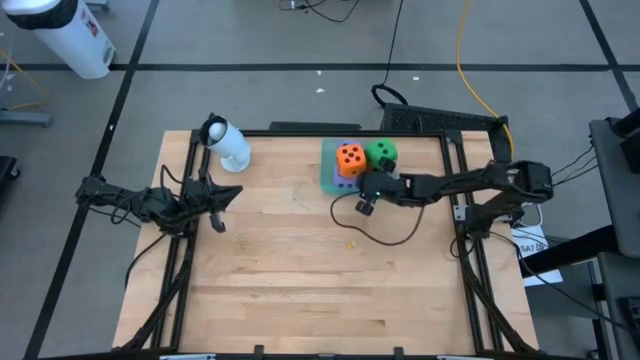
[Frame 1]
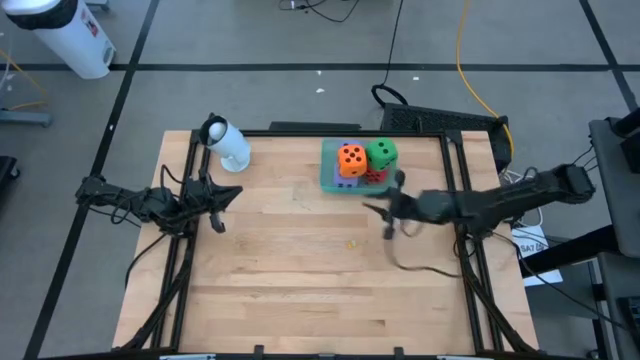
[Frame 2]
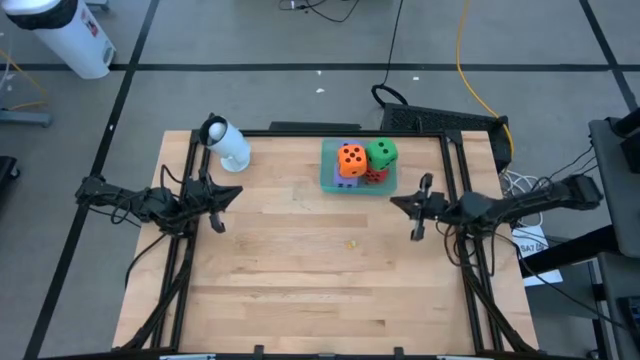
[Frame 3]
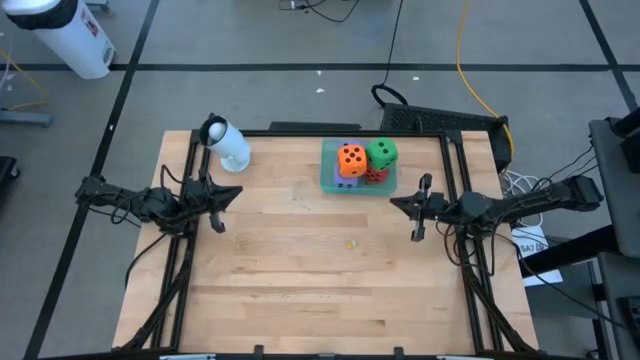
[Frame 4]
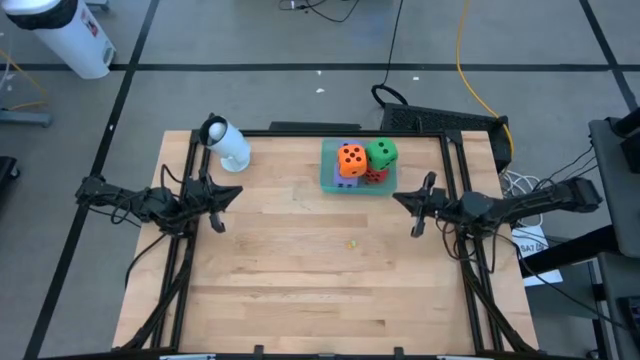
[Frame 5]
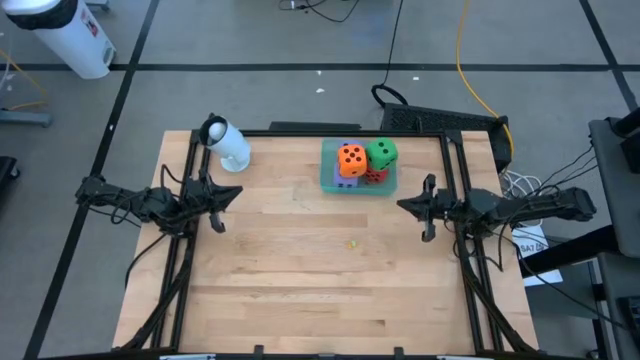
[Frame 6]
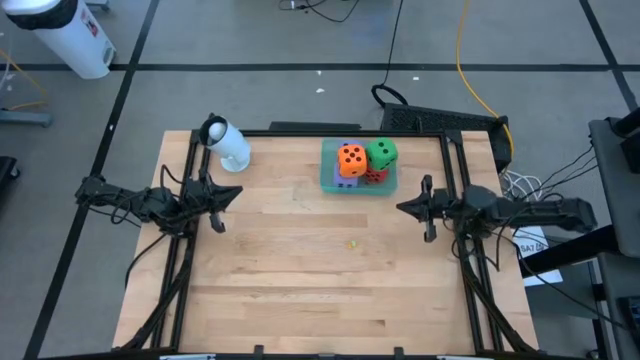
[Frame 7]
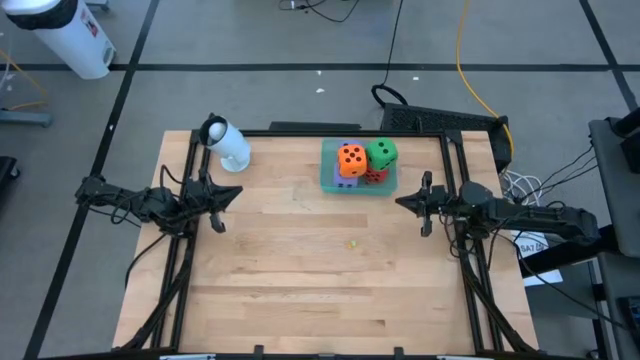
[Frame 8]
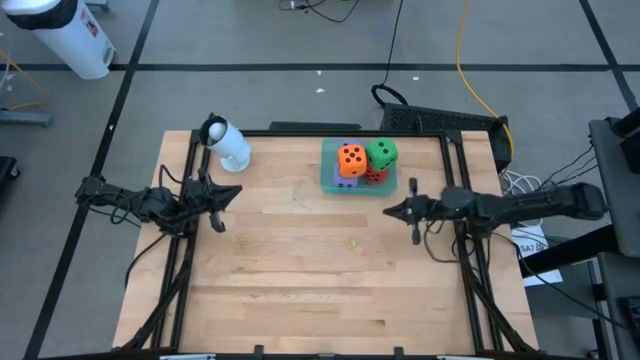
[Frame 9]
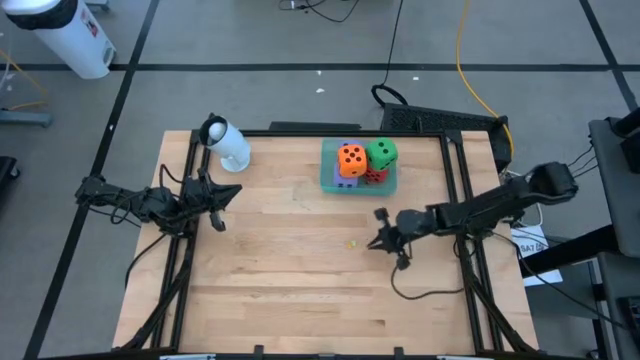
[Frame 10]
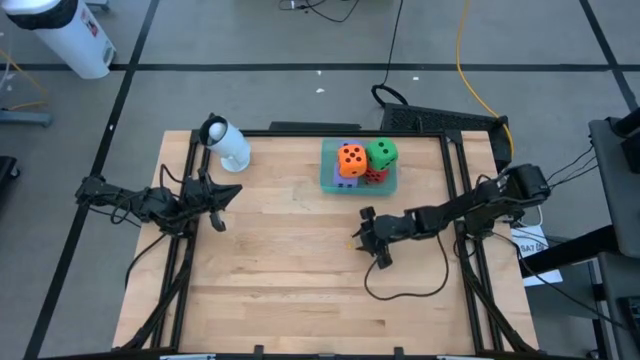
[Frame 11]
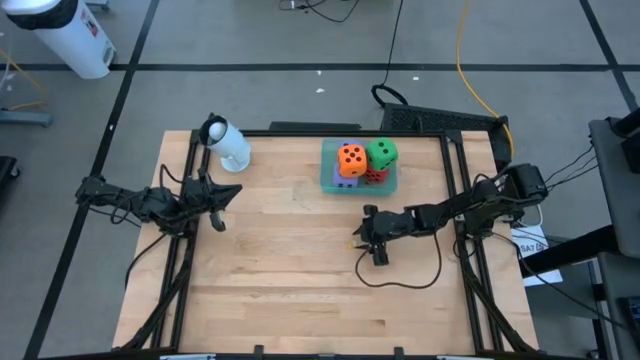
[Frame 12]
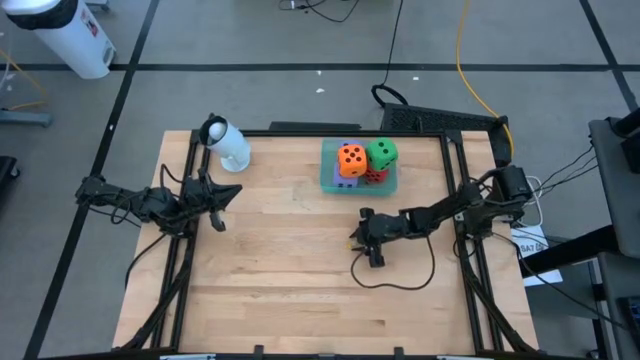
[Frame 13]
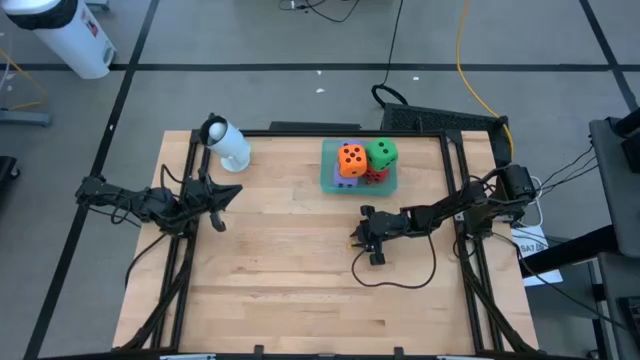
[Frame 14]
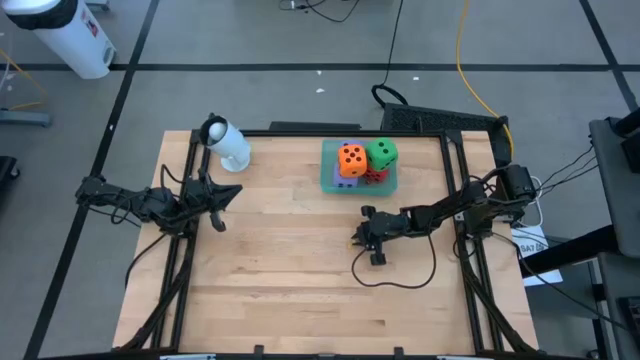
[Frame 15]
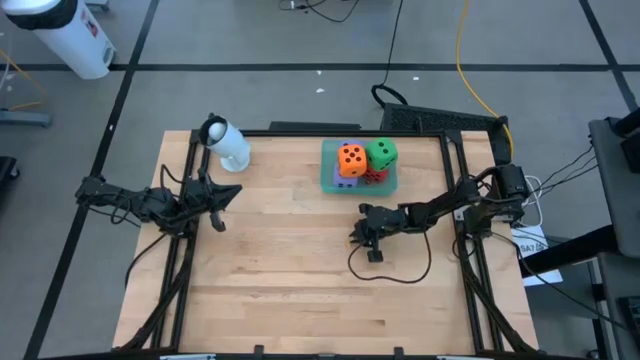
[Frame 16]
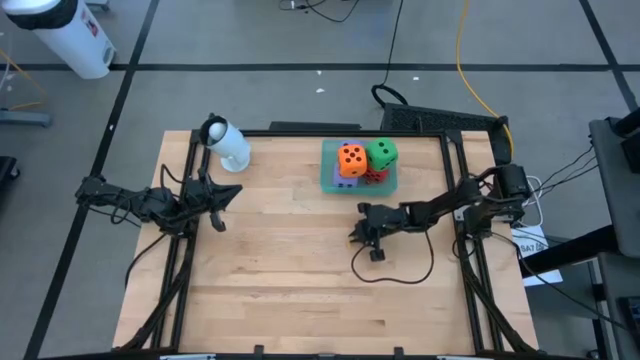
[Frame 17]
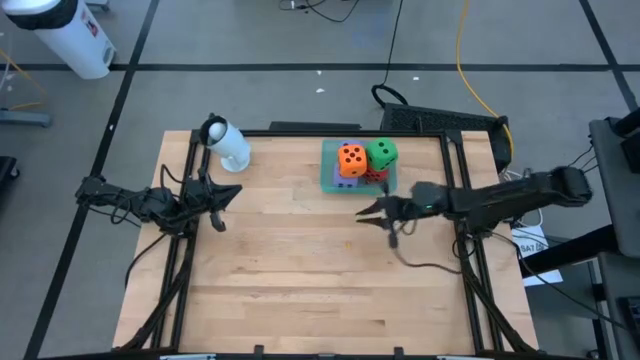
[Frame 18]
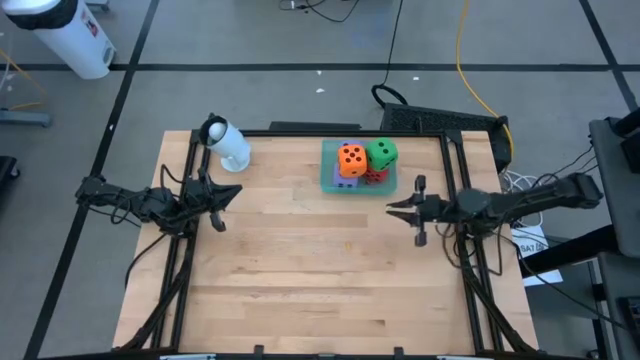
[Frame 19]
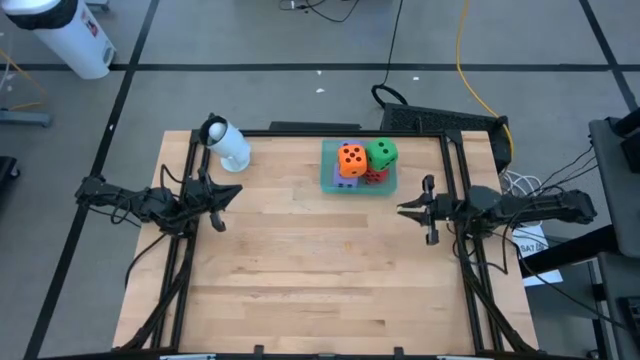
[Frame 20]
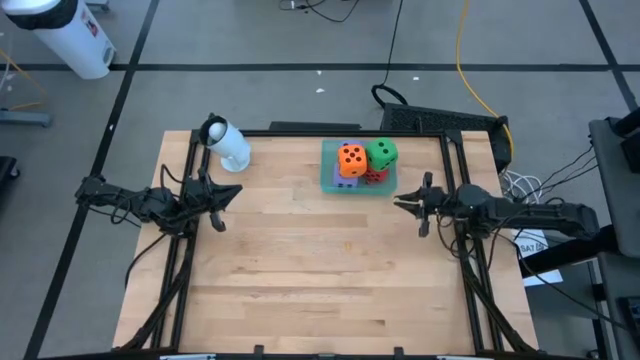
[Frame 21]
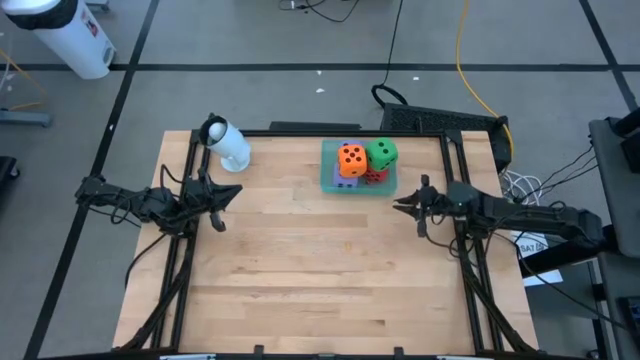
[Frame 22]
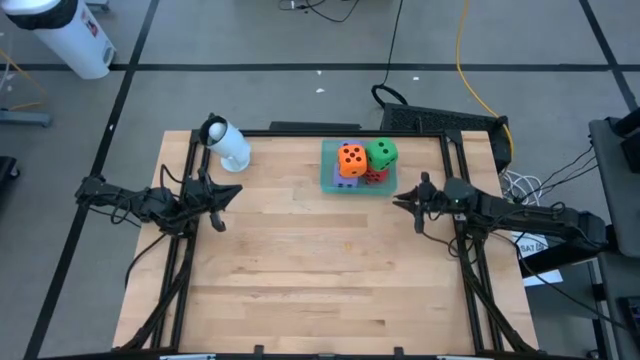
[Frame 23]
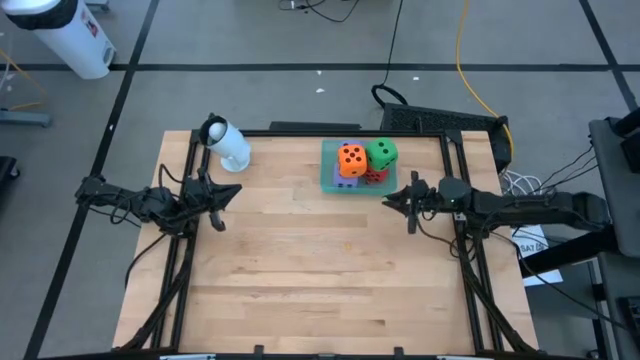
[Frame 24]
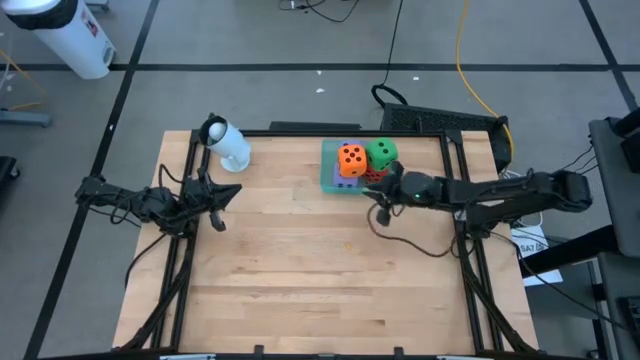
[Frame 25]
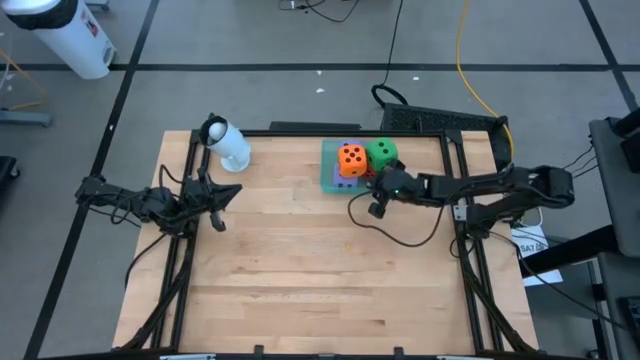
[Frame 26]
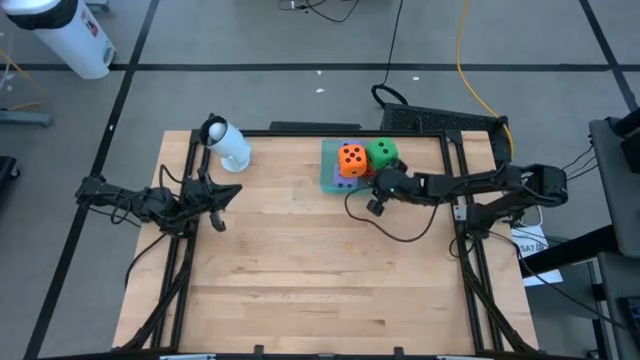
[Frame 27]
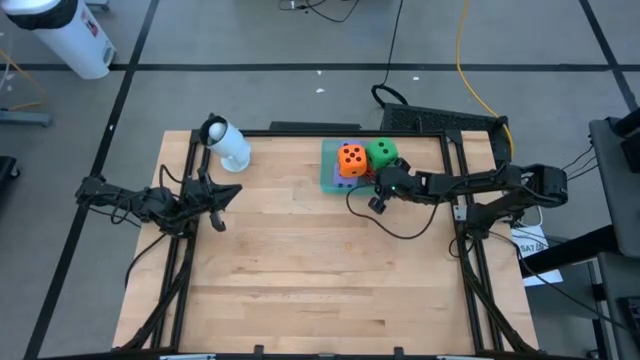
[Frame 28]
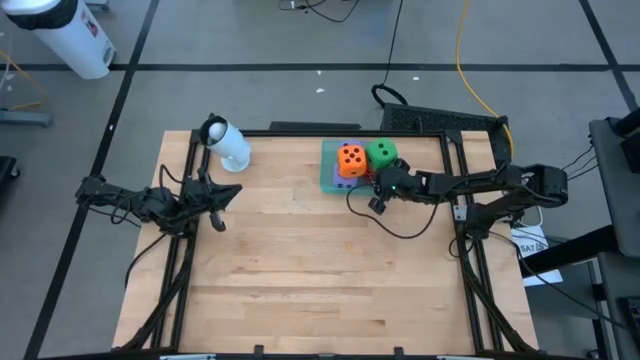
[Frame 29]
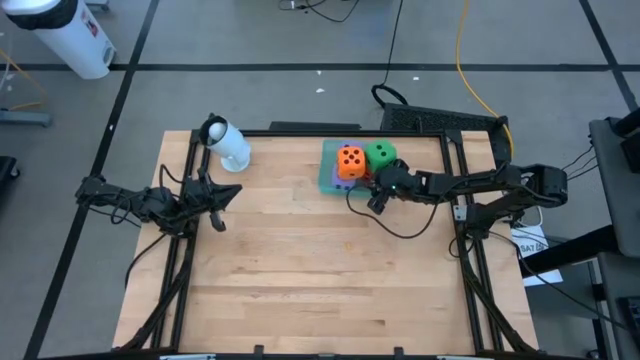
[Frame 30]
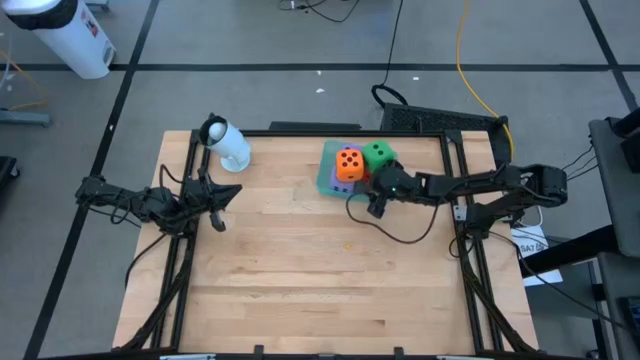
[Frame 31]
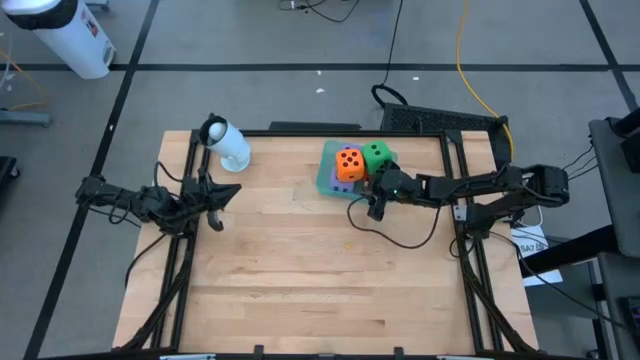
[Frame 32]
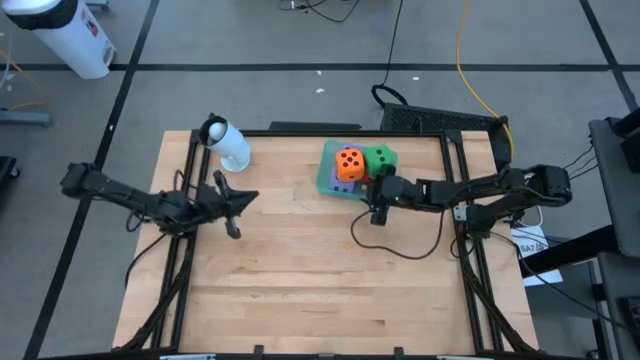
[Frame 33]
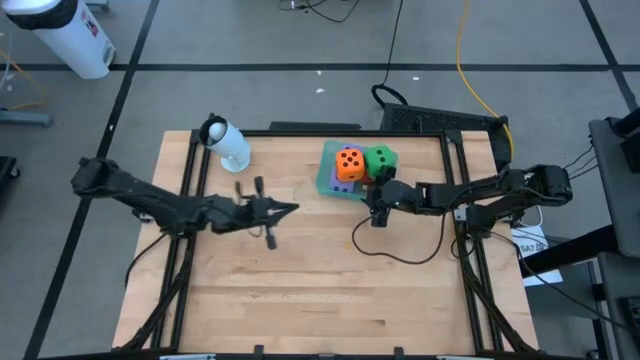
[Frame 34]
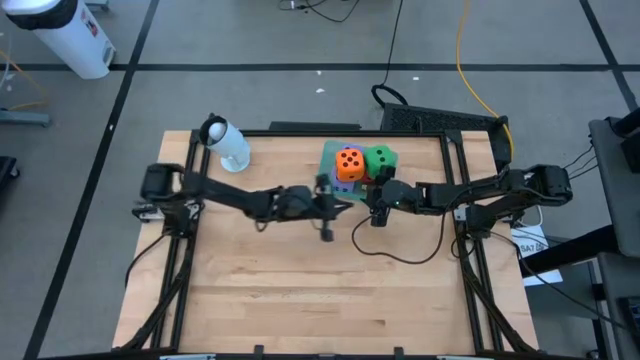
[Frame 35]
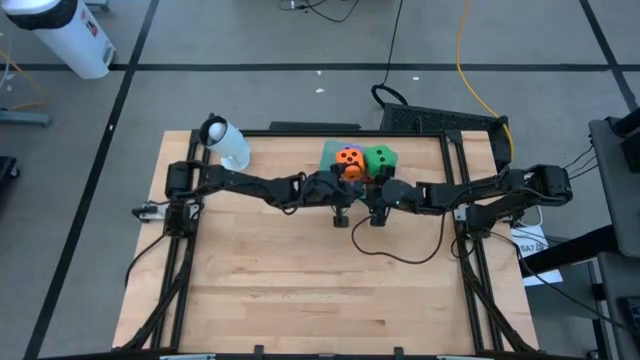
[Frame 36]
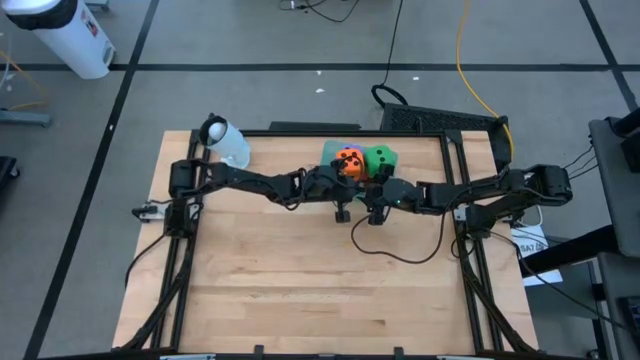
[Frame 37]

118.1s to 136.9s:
Task: Pick & Place Dice
Put the small green die into the bin

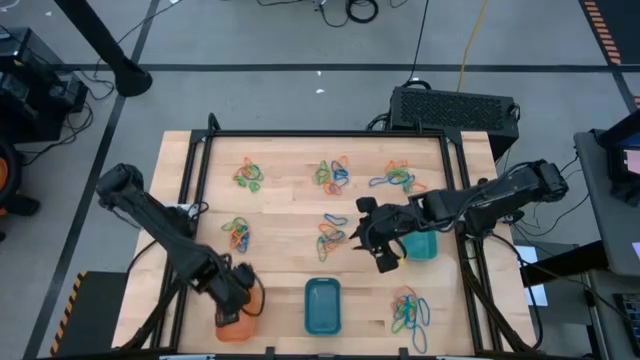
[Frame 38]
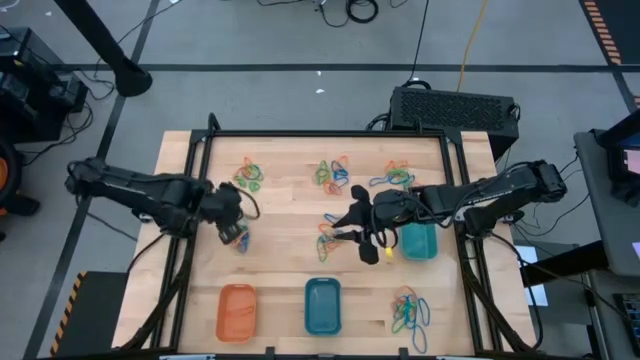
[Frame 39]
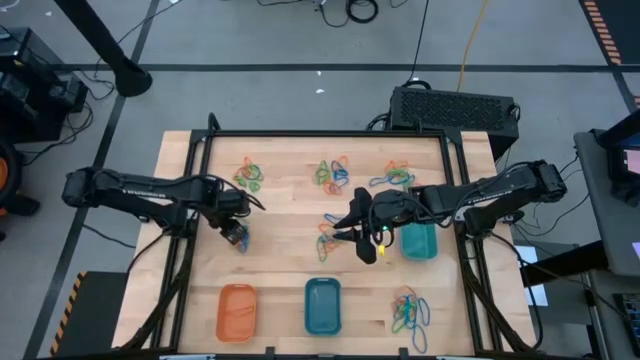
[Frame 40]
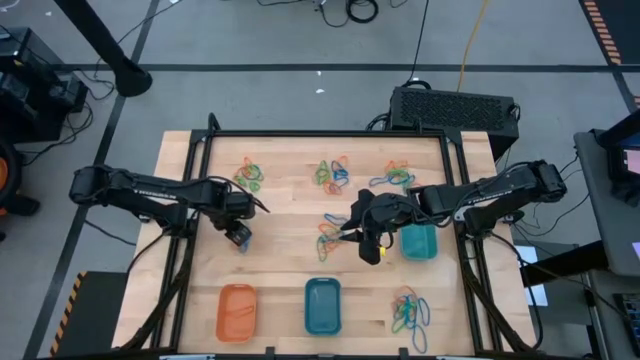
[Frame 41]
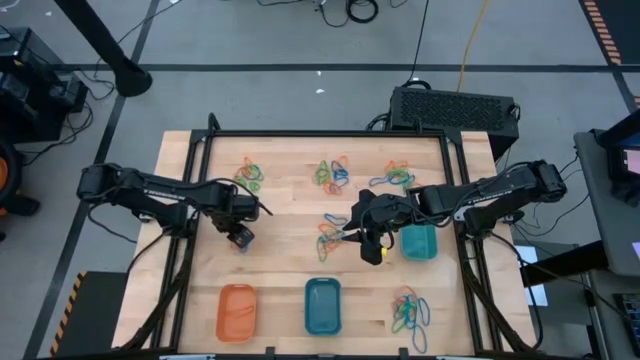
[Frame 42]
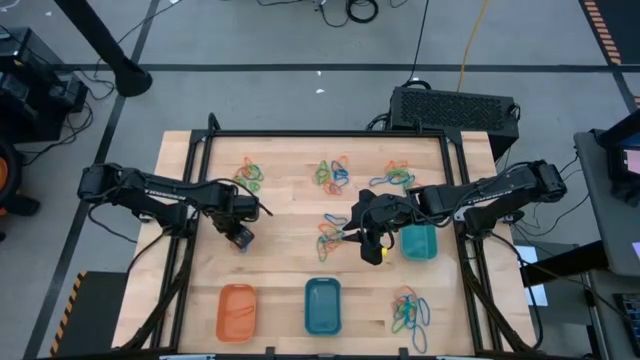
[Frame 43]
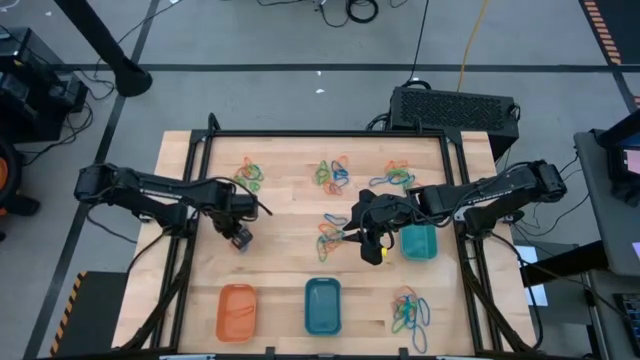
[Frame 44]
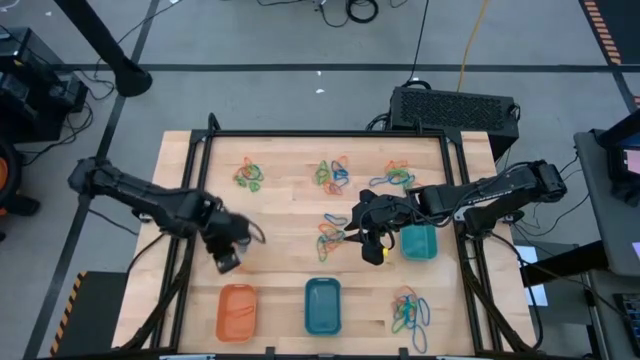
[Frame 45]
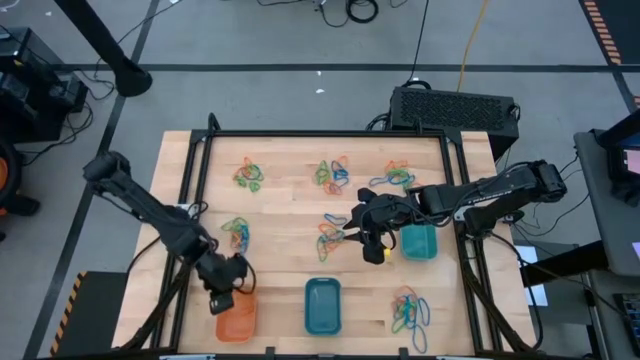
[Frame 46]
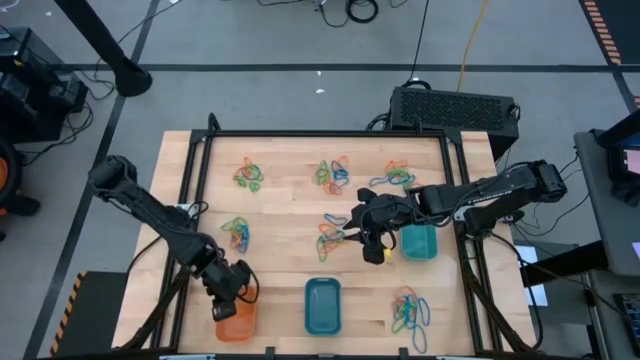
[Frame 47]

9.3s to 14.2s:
Task: Sort rubber bands into baskets
Put the orange rubber band into the orange bin
